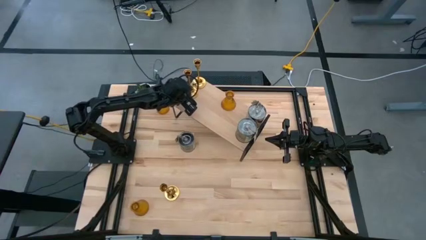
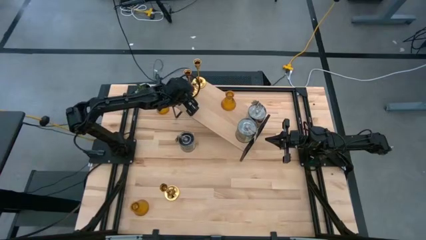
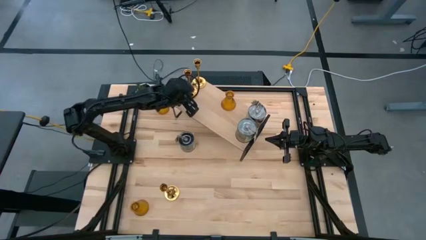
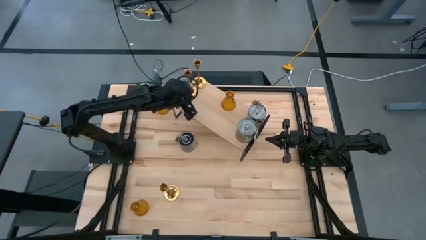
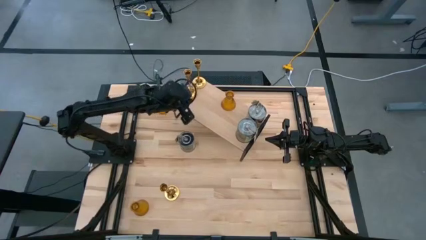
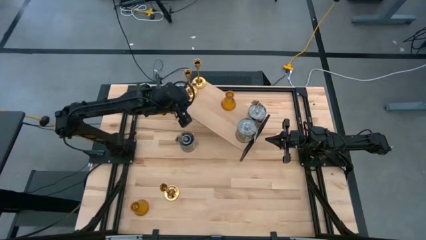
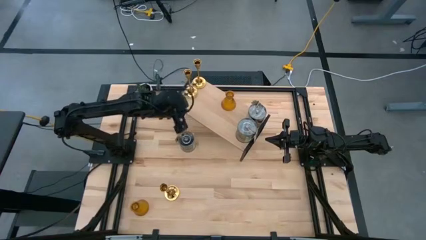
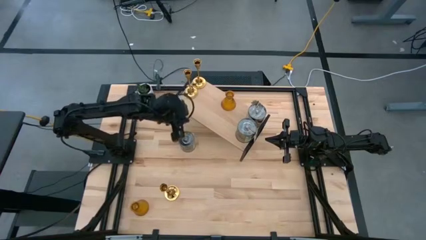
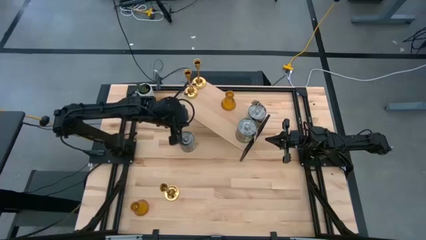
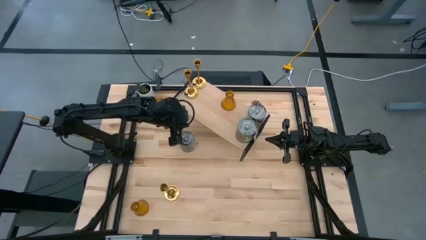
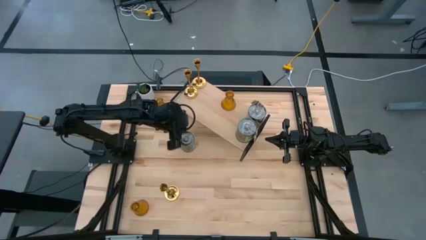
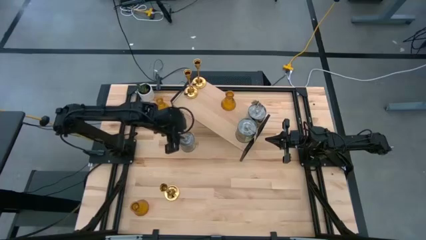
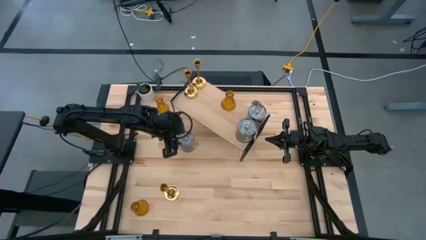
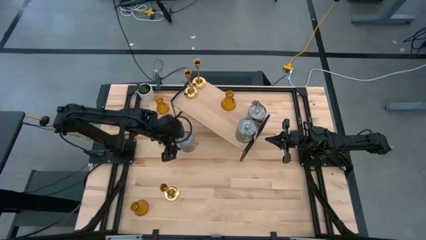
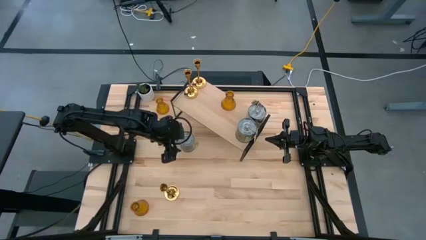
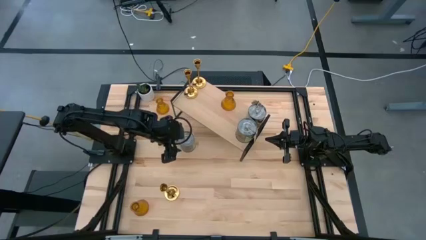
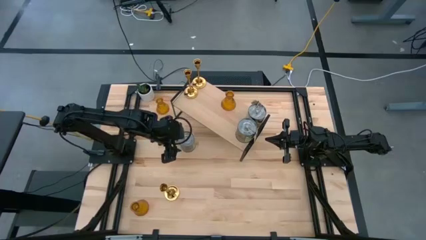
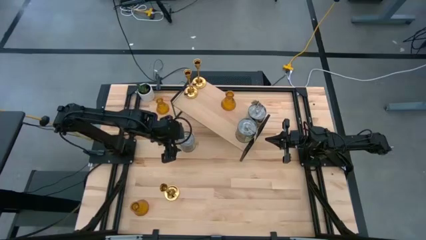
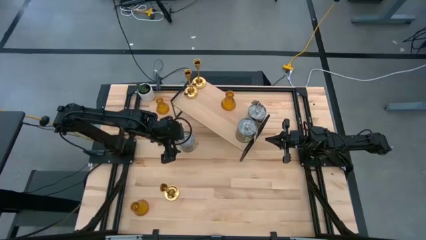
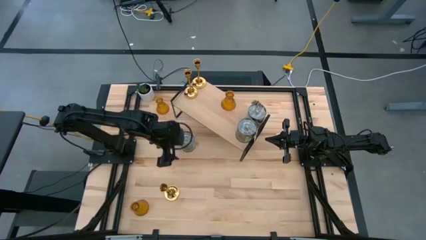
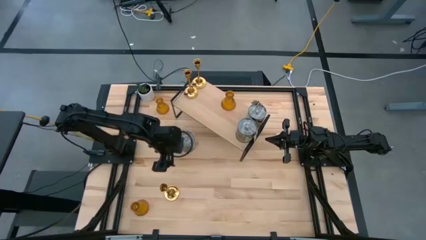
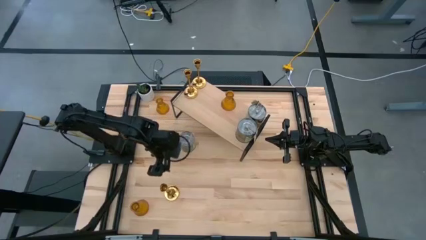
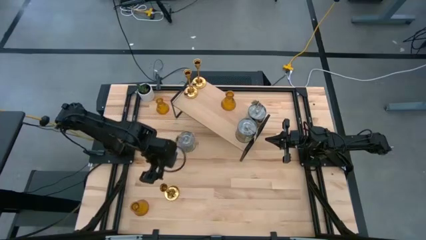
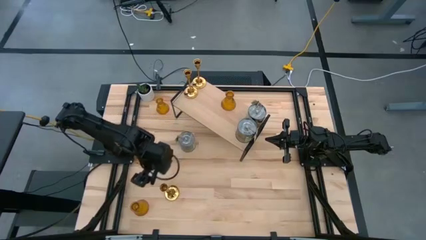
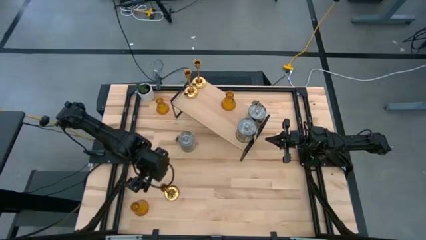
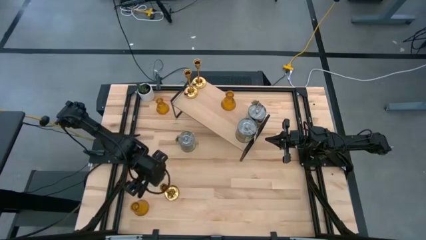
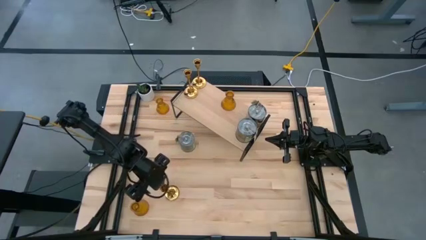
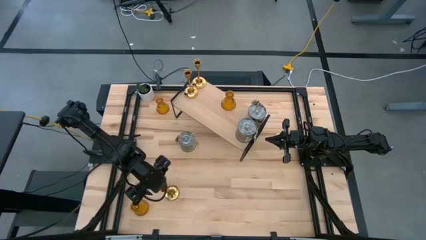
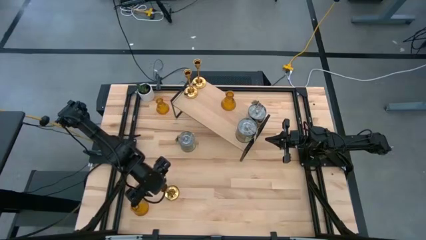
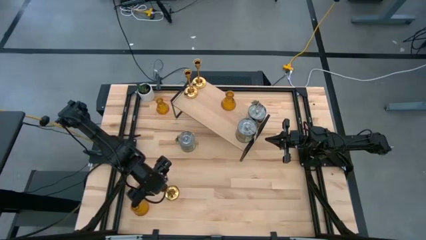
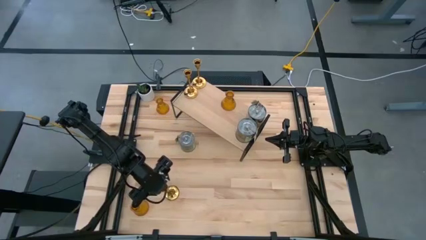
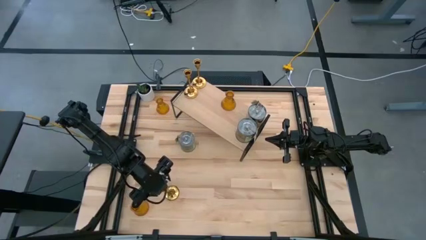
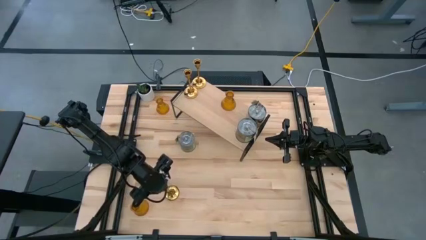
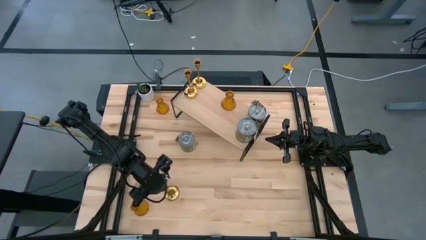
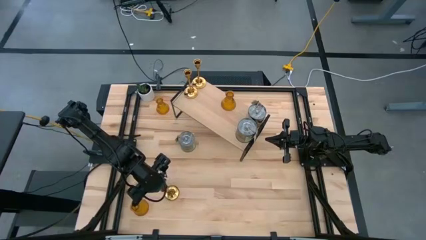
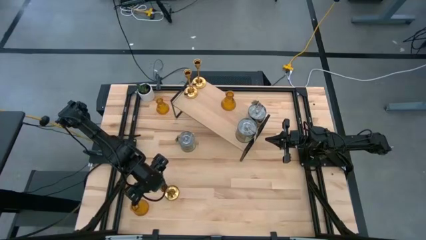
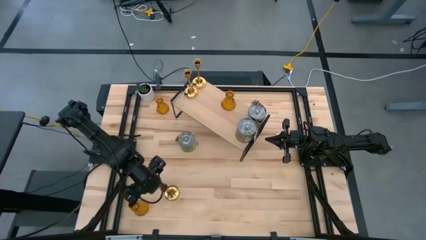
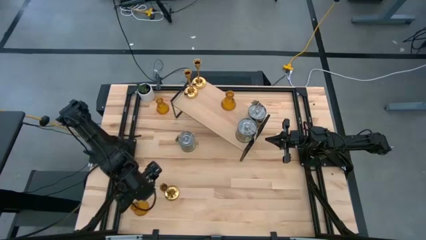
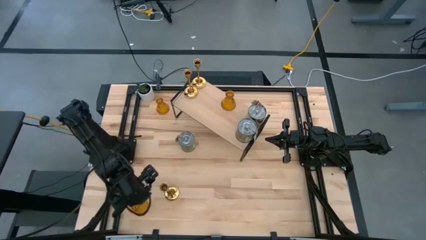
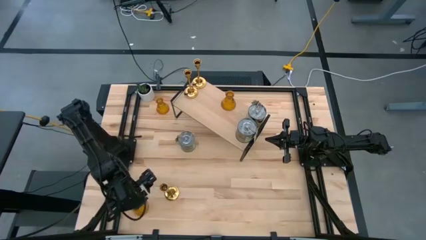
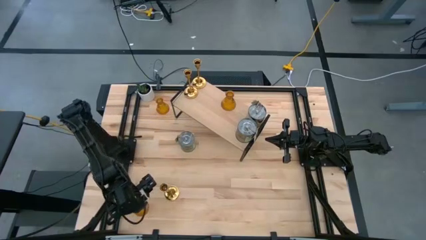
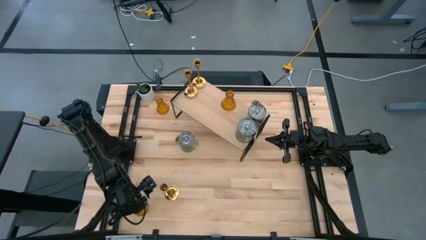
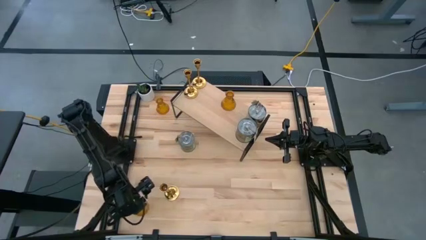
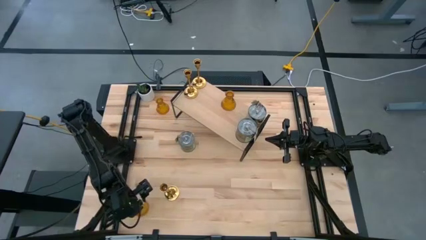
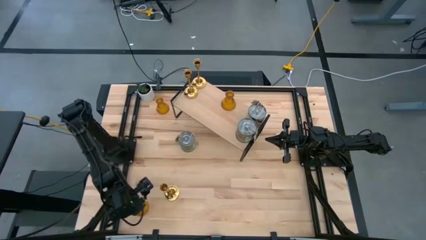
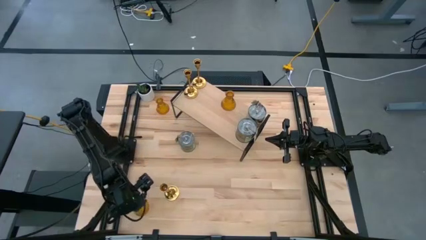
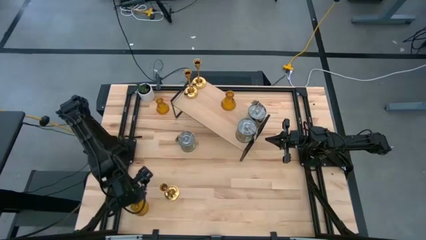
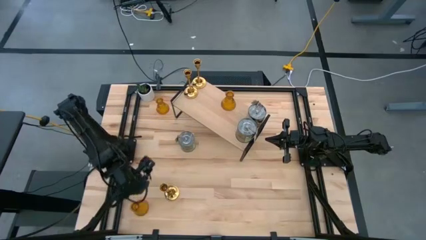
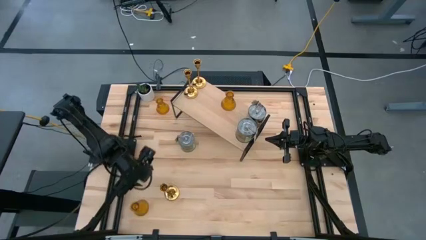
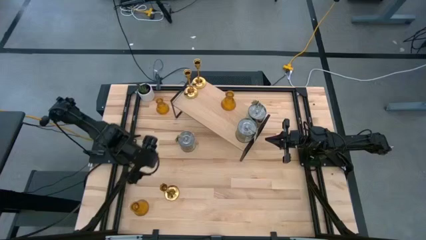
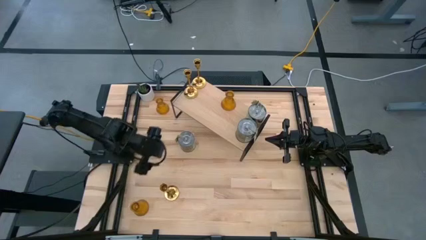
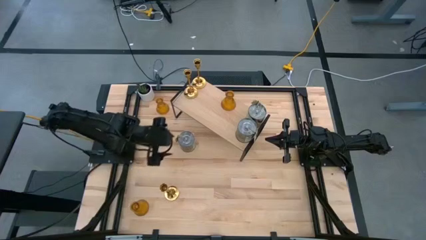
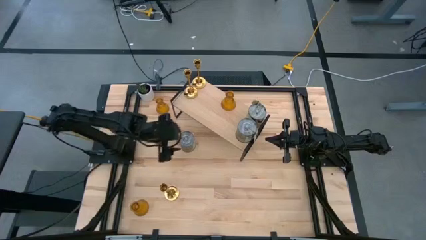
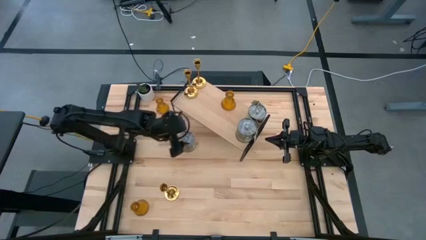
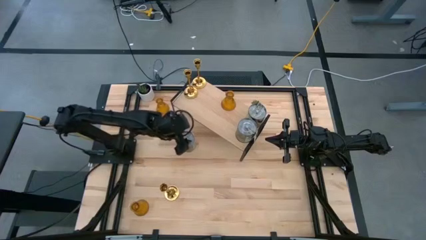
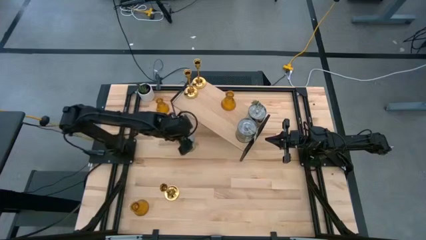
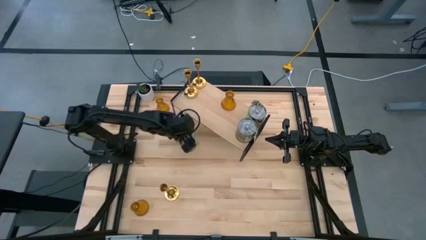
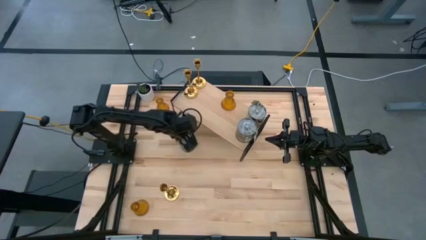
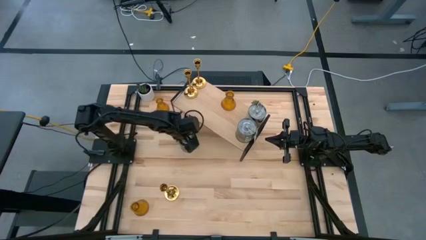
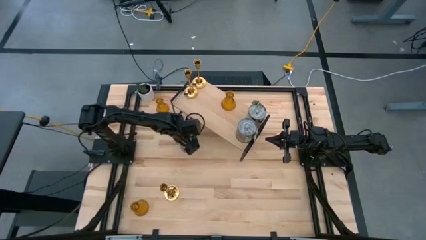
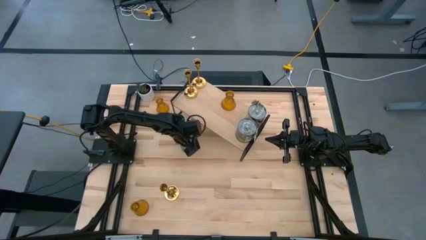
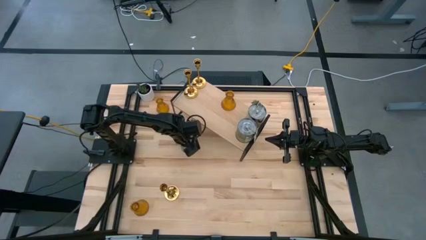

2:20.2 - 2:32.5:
Task: Pick & Place candle stick holders
Put the scented candle on the shelf
